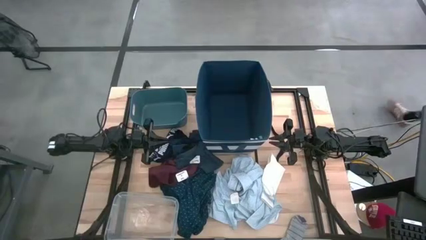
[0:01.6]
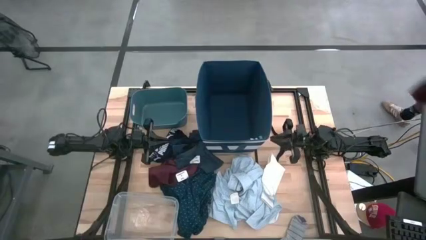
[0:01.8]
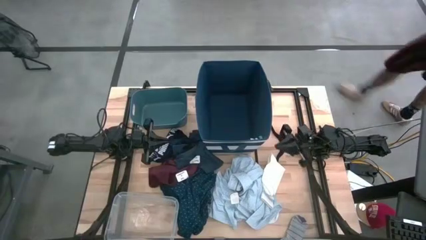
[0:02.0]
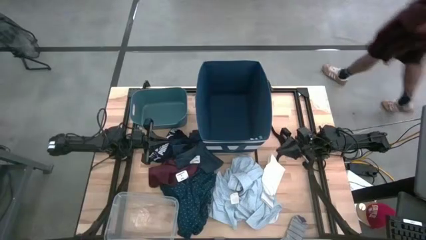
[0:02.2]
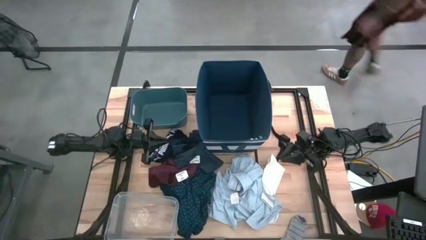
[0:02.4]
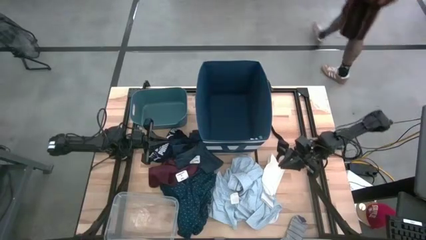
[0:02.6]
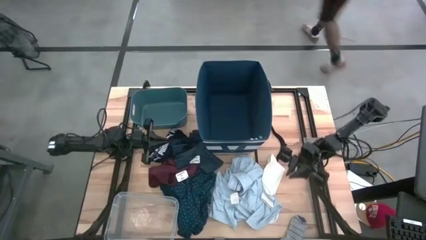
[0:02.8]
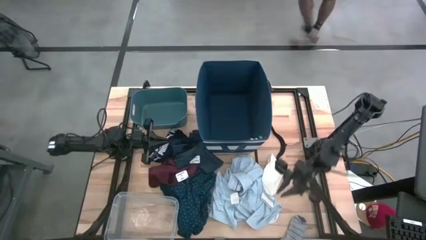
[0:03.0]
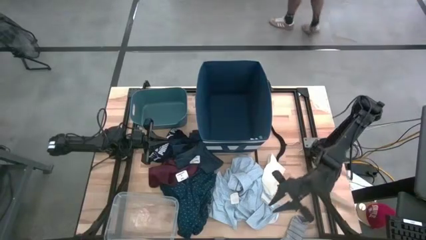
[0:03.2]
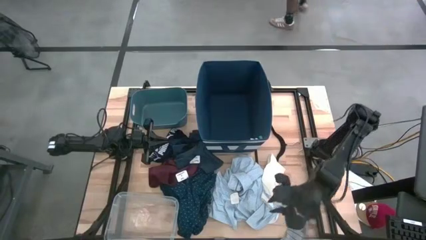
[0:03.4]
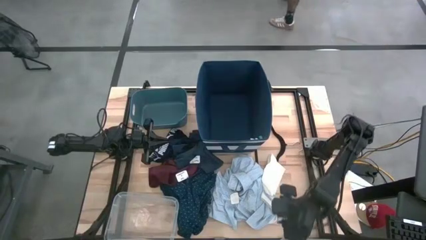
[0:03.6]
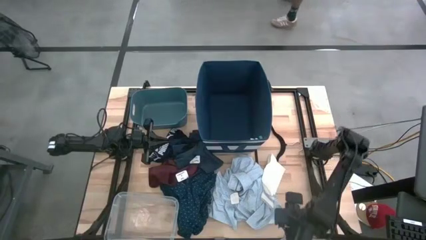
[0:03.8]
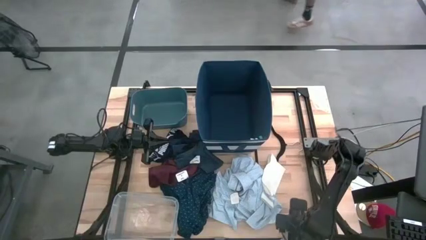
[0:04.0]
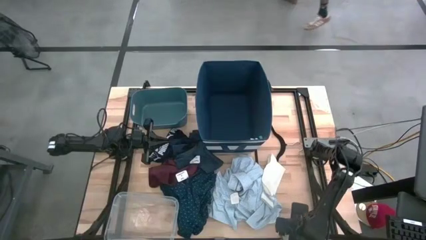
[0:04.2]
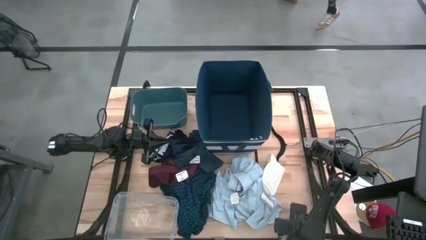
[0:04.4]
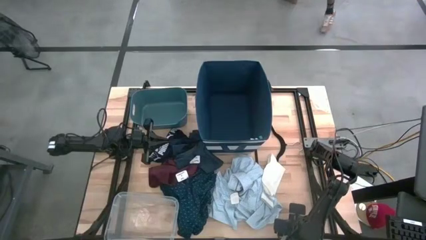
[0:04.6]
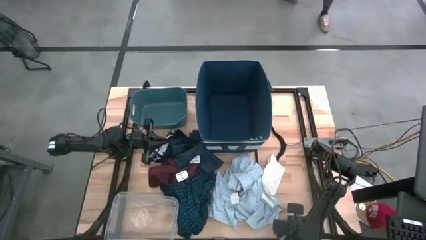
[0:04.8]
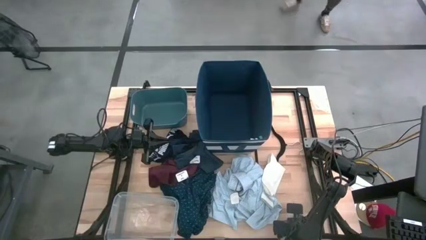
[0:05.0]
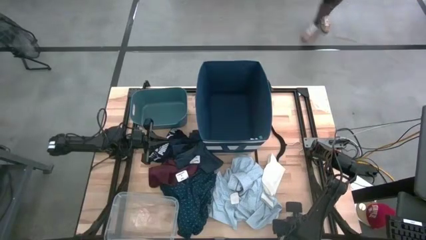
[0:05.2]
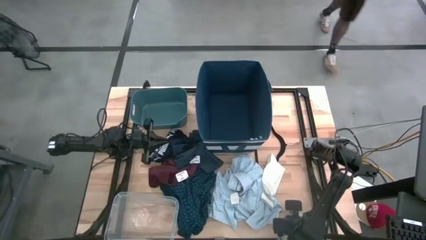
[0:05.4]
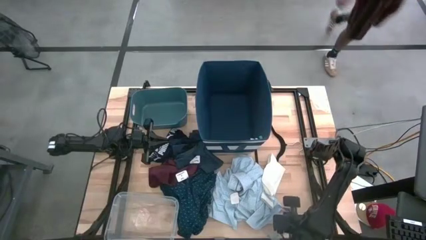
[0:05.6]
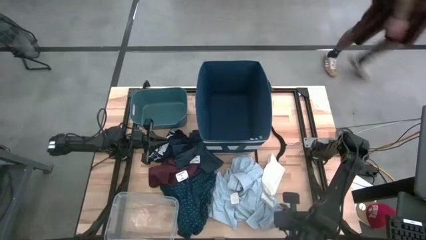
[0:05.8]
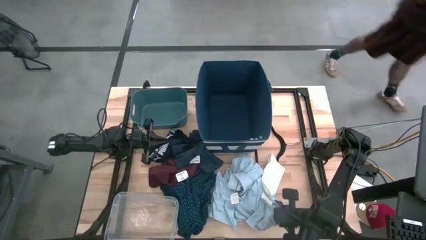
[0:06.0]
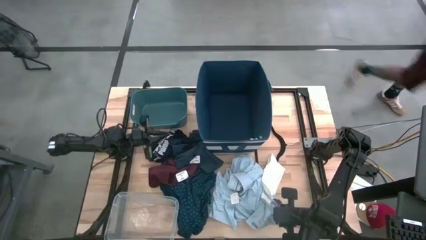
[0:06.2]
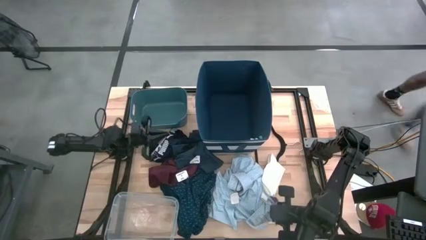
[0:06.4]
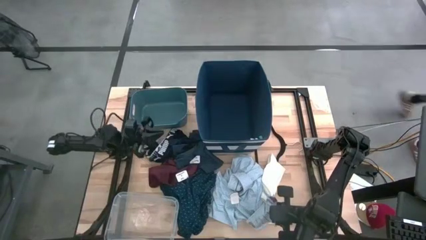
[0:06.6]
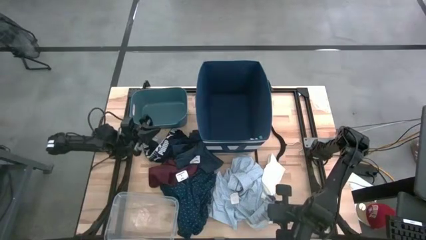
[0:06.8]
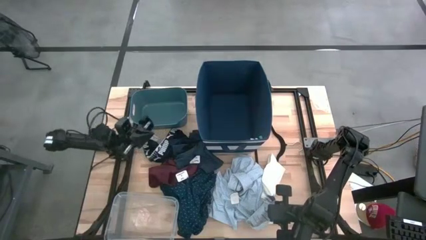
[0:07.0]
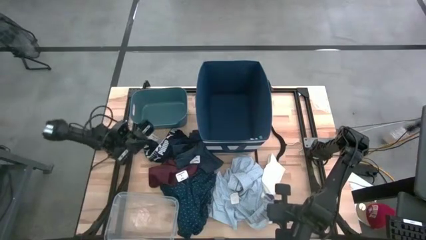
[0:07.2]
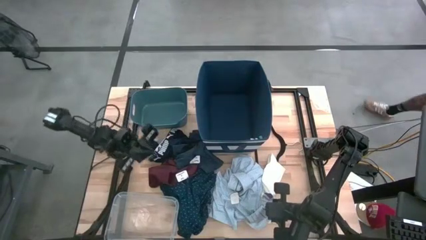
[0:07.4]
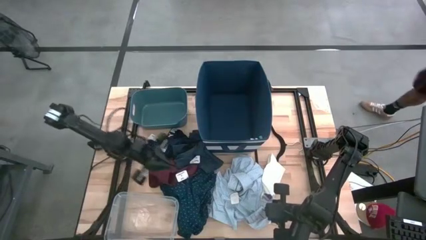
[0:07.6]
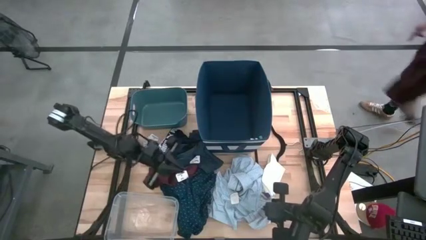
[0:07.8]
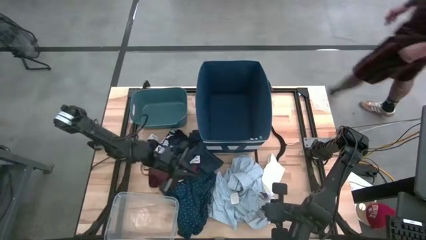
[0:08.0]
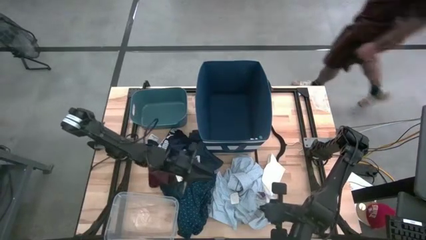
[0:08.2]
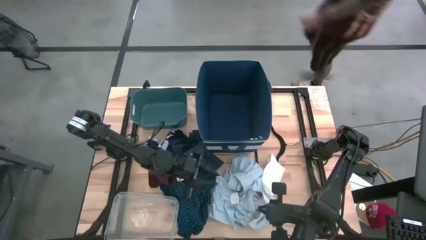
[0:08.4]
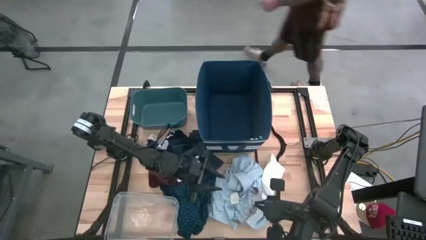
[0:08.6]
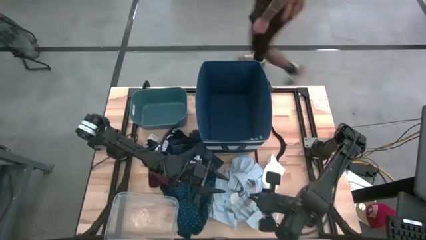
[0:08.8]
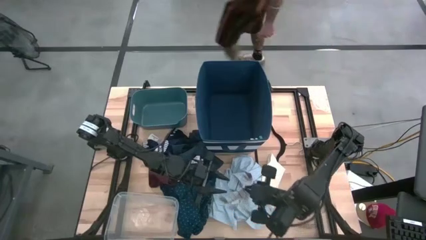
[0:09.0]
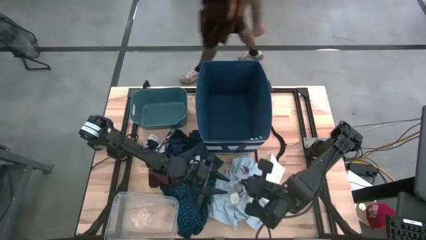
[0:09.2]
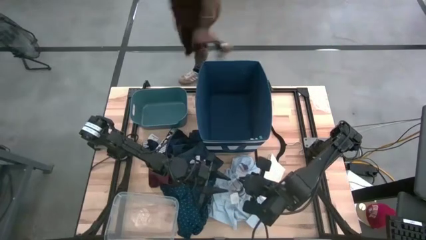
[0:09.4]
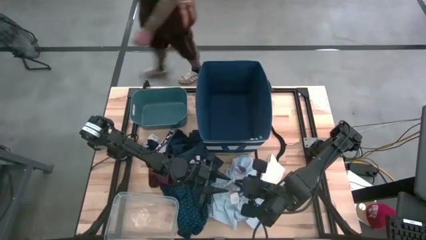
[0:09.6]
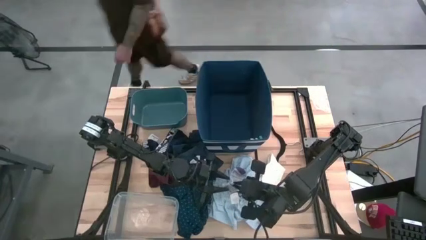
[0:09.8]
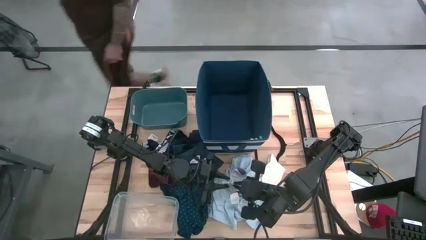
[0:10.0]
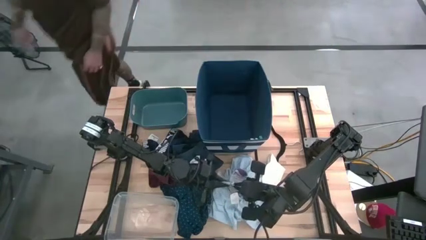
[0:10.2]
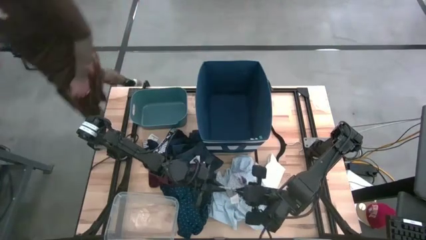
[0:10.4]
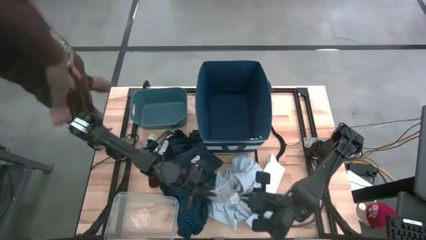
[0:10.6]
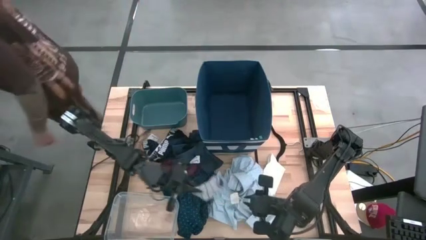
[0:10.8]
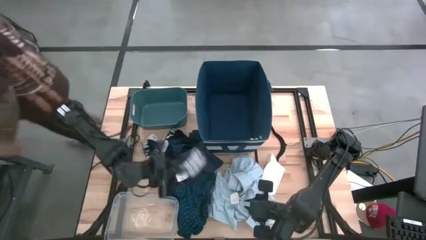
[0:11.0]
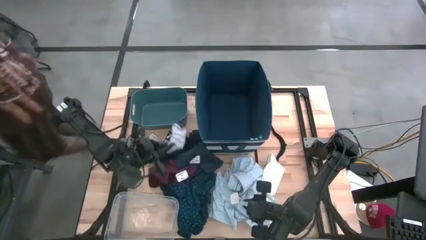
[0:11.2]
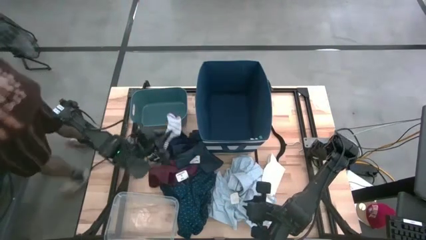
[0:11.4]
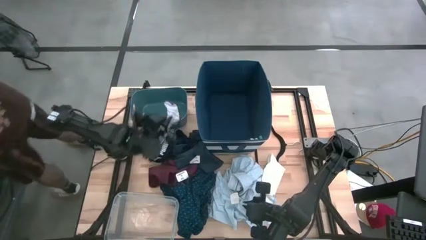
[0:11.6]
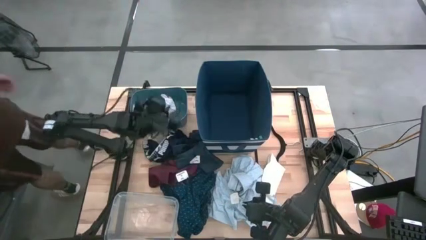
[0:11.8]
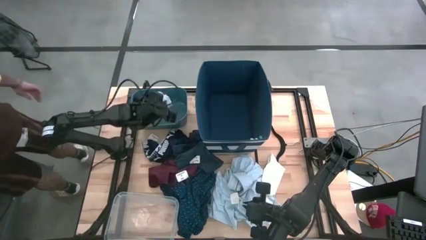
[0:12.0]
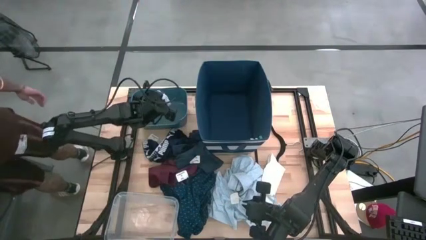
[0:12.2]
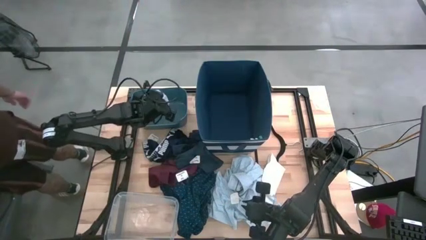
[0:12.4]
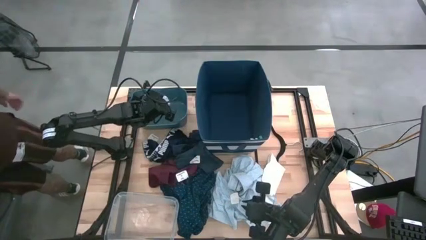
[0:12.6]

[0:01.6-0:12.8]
Task: Pick & Place Cloths
Put the gray sock into the blue bin

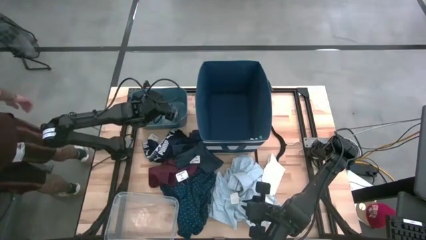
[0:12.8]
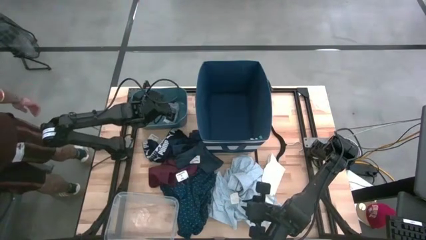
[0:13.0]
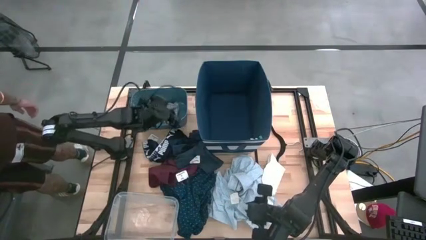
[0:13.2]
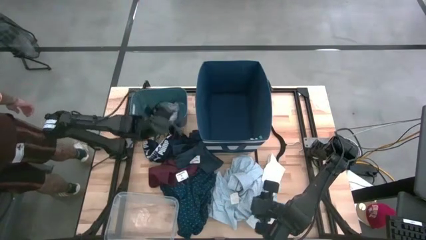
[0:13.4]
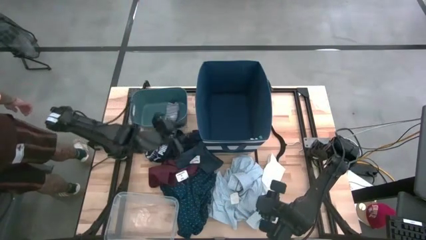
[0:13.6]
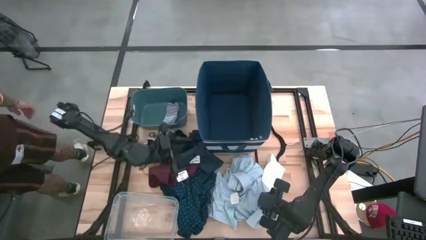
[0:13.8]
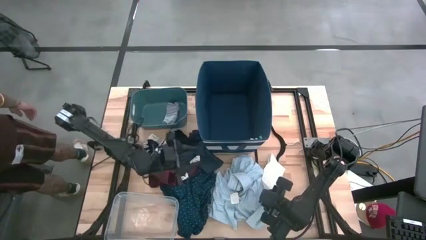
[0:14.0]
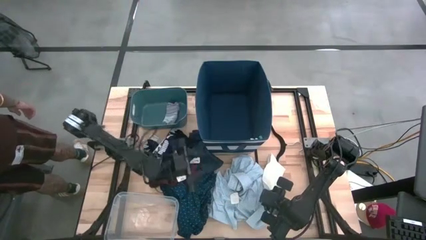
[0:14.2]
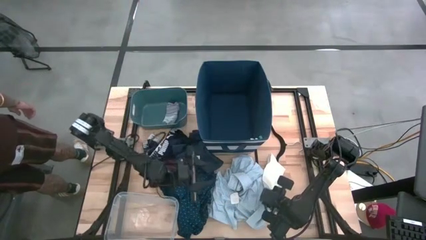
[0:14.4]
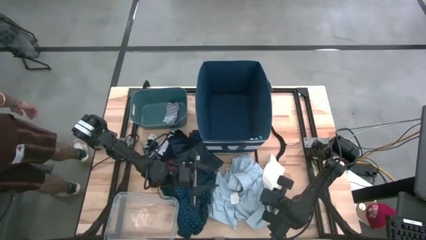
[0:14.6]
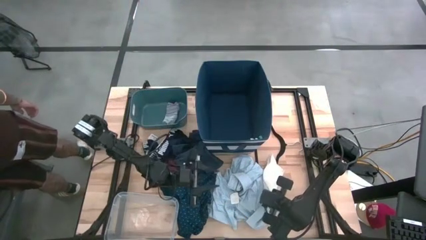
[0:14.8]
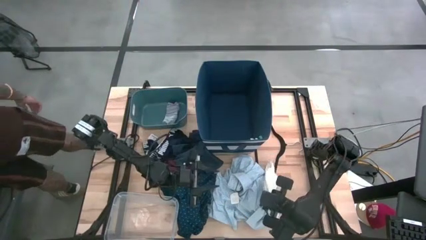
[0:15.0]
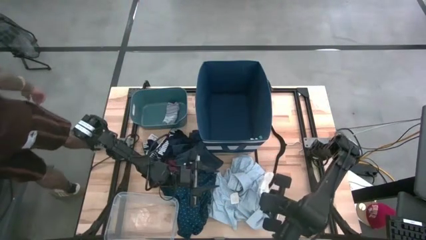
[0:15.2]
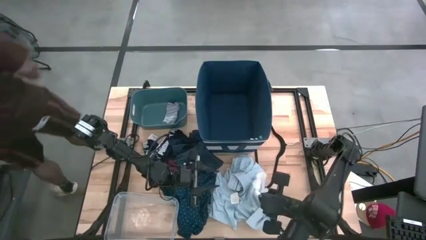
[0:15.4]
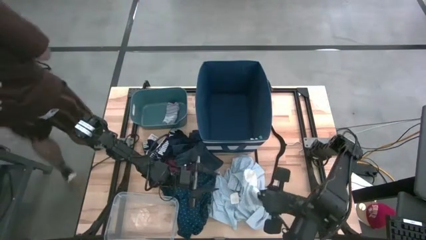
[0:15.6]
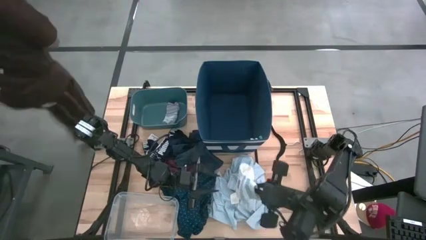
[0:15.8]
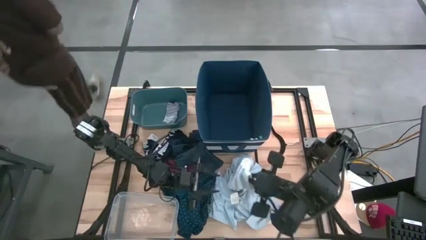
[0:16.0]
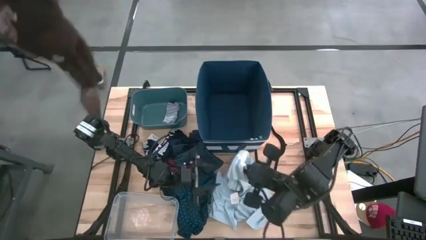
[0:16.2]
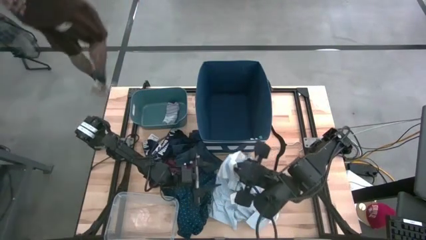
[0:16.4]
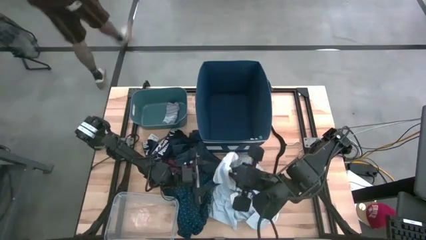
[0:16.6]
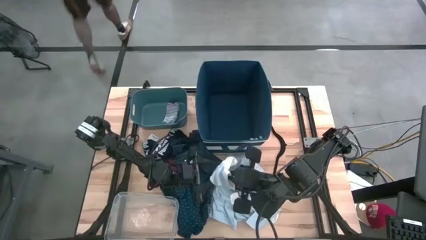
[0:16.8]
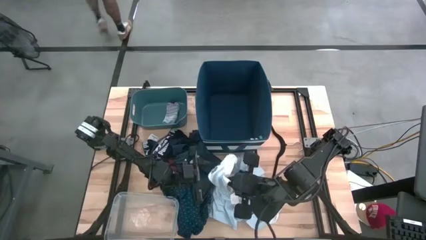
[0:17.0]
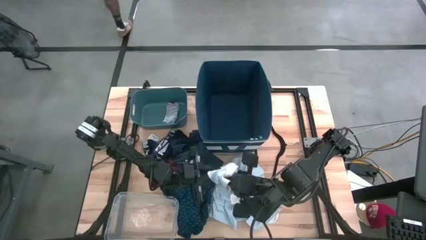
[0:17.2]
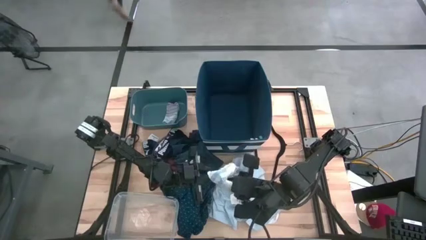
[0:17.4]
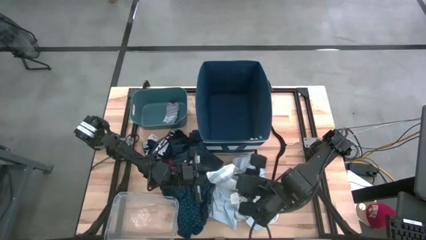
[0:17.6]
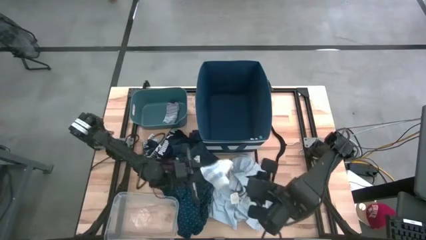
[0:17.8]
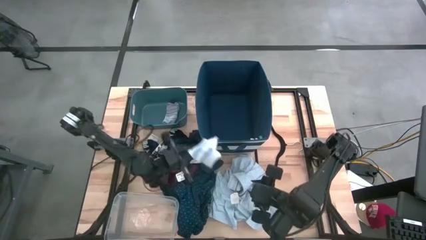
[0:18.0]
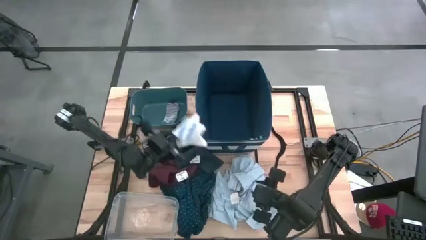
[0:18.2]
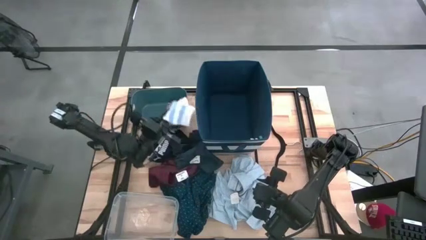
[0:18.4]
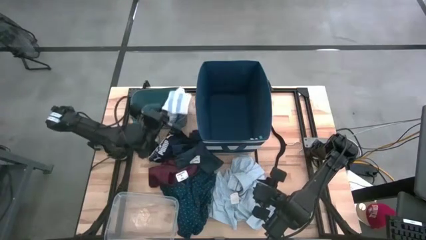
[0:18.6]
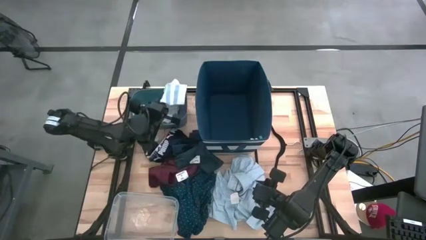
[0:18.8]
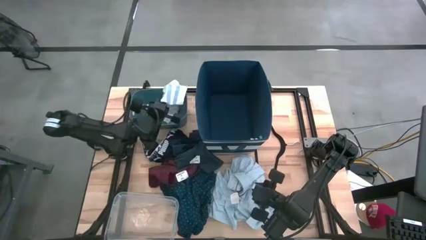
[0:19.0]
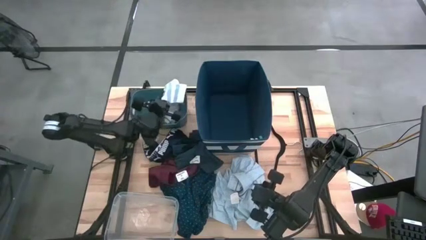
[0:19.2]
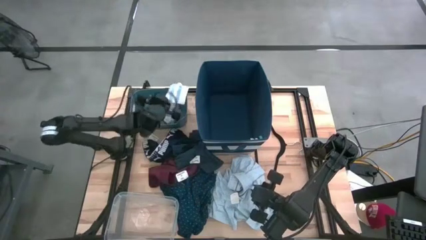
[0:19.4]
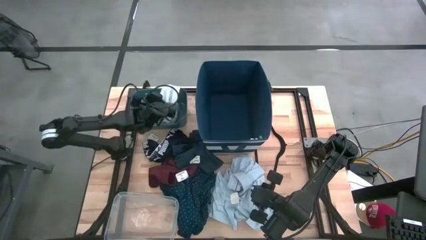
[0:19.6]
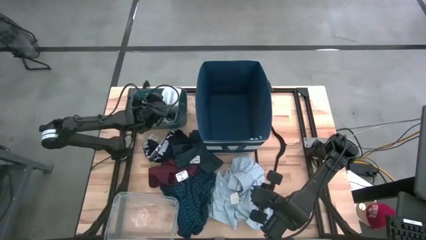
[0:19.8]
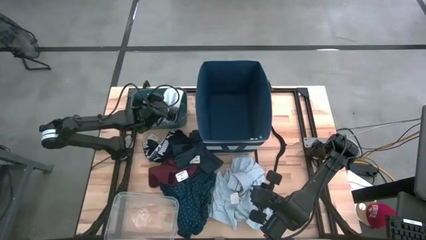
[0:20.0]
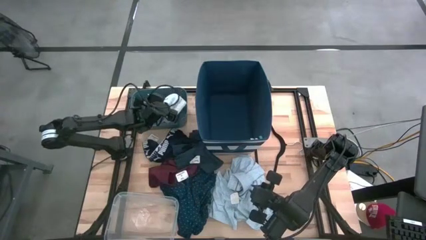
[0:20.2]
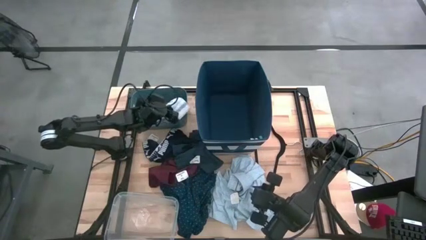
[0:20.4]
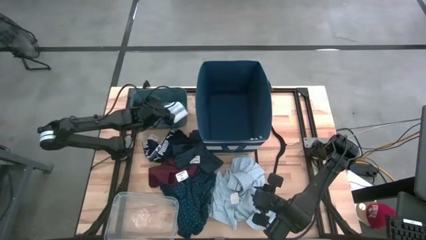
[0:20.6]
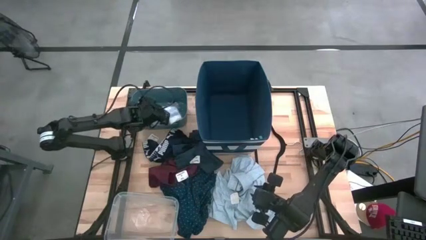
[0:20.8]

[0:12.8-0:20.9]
Put the white sock into the blue bin
